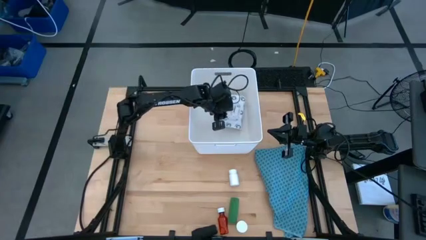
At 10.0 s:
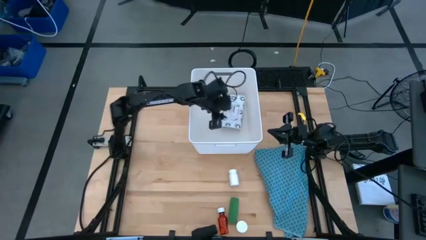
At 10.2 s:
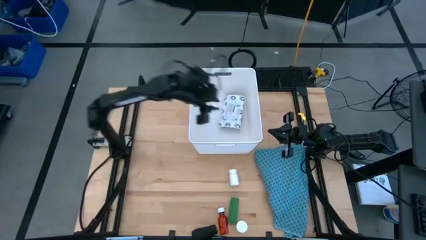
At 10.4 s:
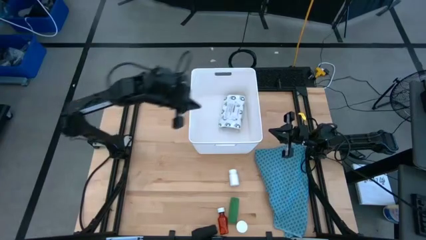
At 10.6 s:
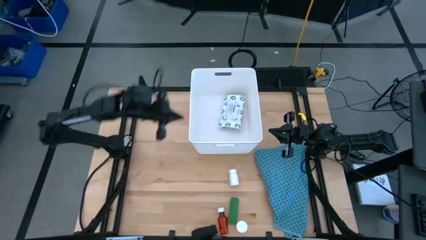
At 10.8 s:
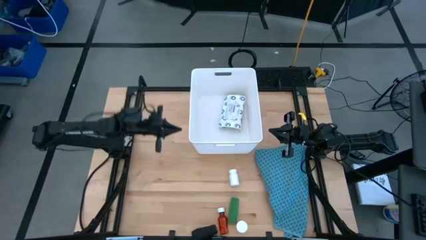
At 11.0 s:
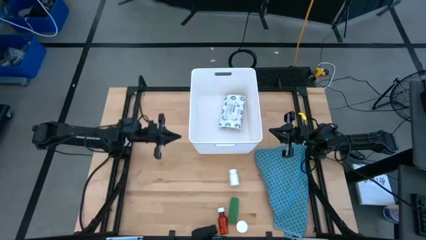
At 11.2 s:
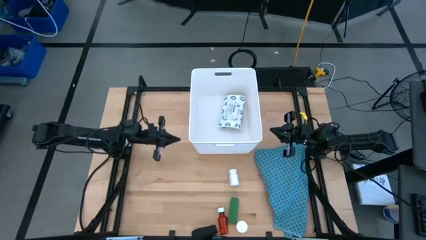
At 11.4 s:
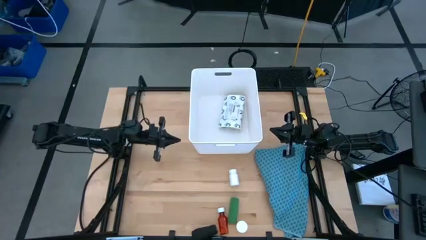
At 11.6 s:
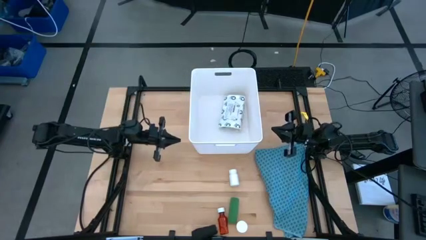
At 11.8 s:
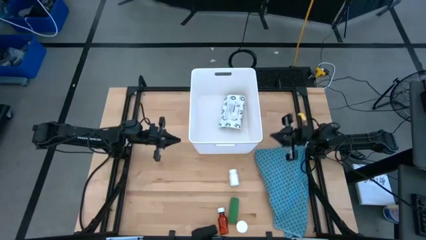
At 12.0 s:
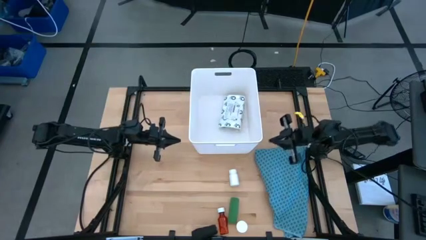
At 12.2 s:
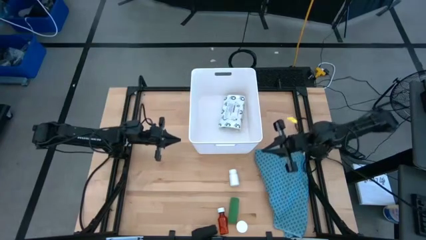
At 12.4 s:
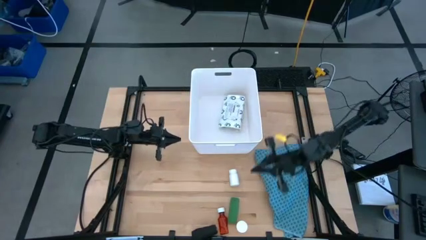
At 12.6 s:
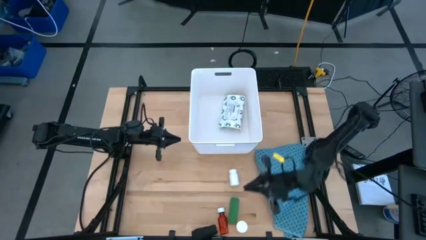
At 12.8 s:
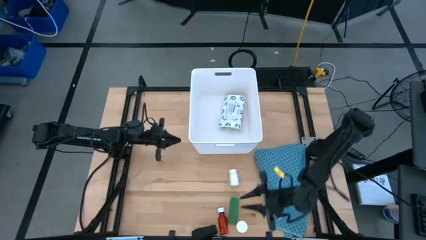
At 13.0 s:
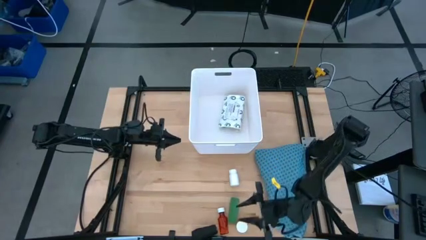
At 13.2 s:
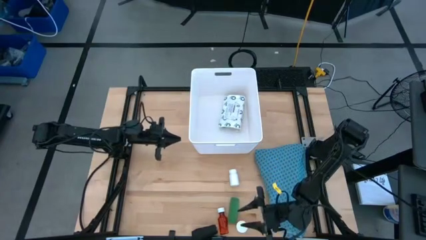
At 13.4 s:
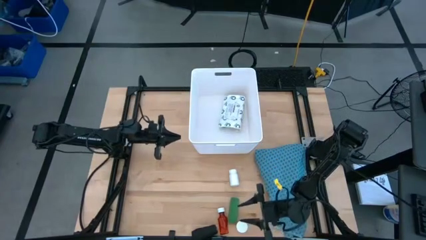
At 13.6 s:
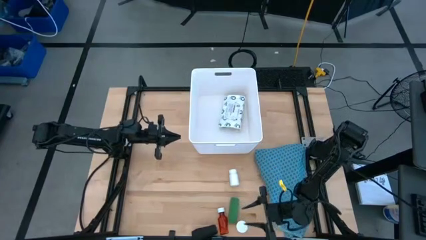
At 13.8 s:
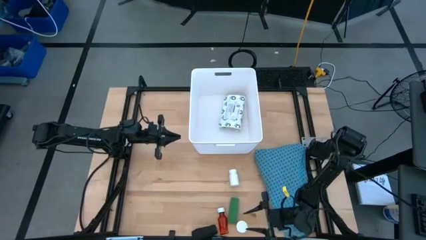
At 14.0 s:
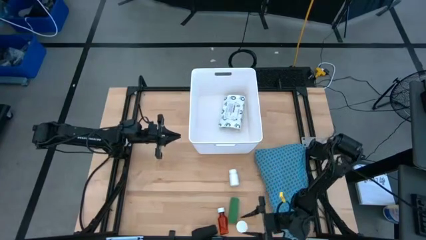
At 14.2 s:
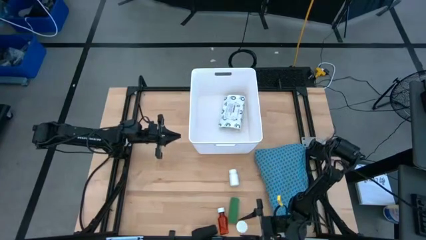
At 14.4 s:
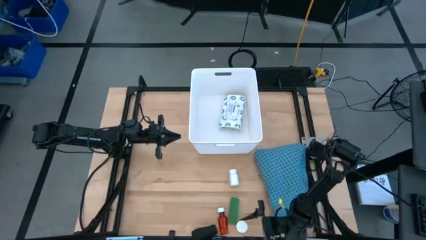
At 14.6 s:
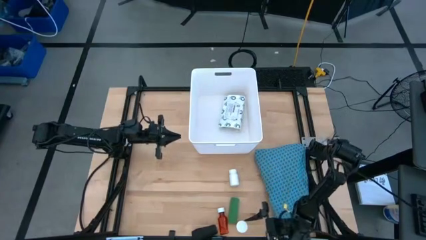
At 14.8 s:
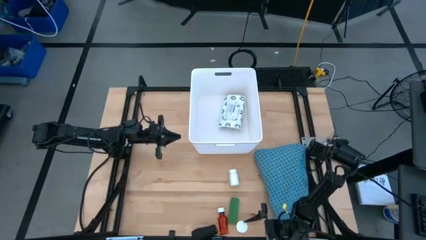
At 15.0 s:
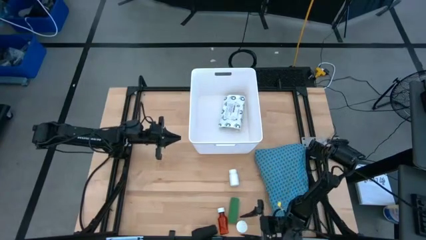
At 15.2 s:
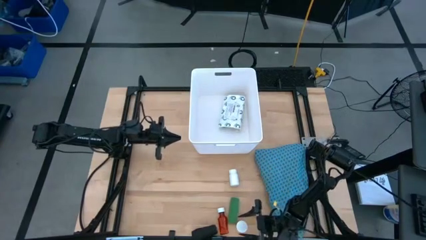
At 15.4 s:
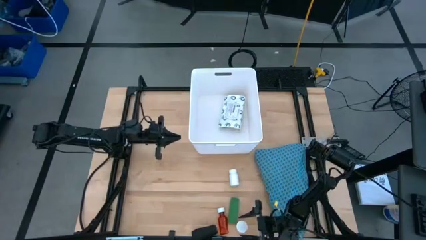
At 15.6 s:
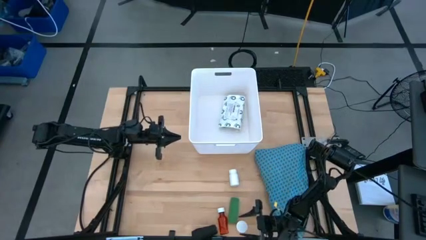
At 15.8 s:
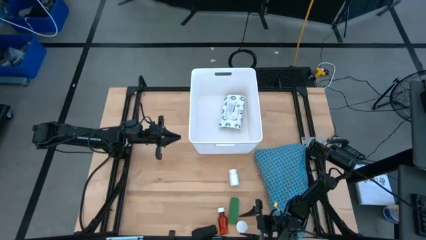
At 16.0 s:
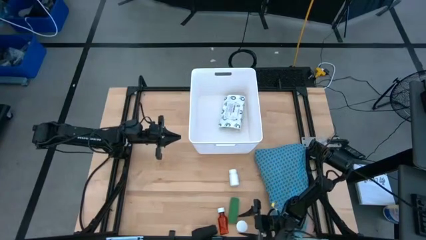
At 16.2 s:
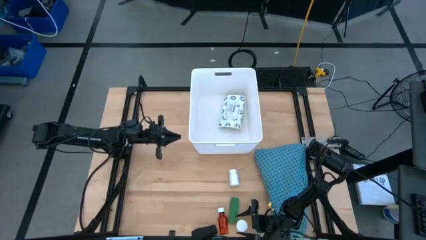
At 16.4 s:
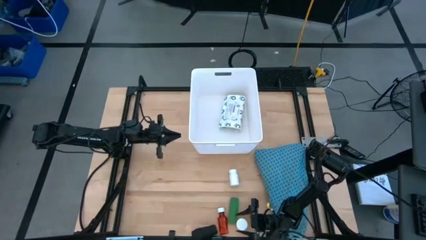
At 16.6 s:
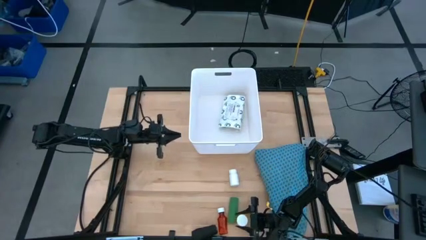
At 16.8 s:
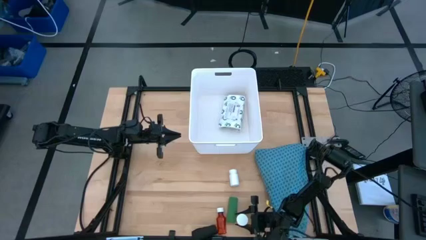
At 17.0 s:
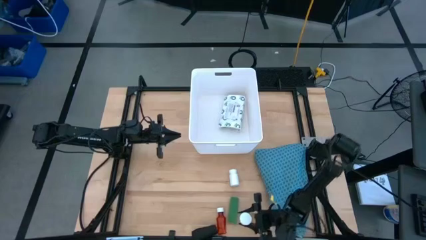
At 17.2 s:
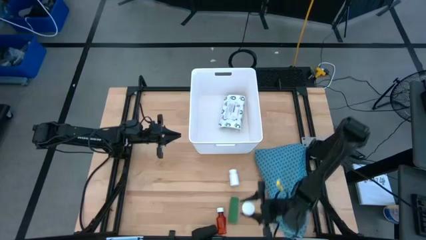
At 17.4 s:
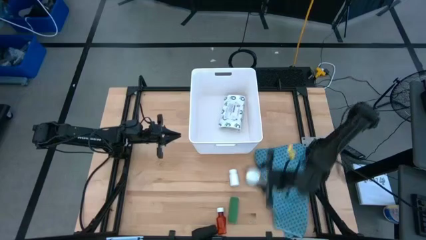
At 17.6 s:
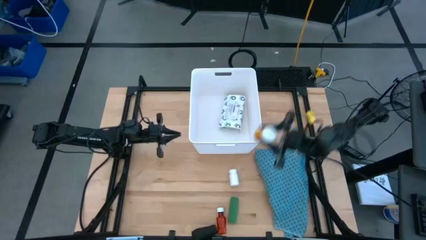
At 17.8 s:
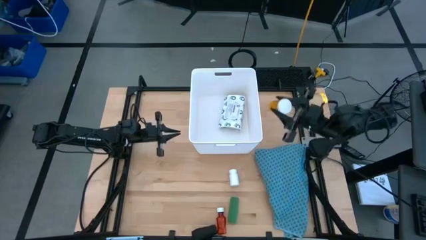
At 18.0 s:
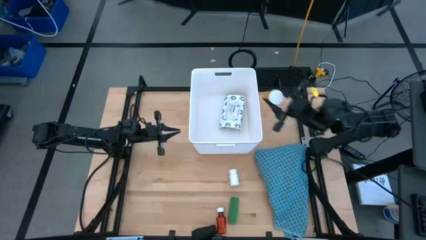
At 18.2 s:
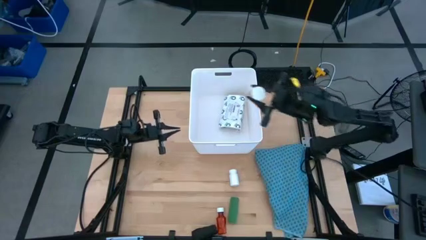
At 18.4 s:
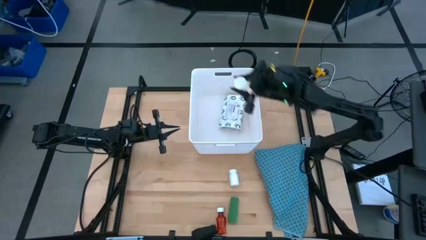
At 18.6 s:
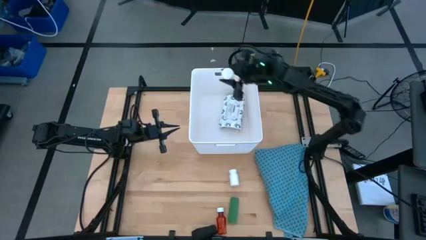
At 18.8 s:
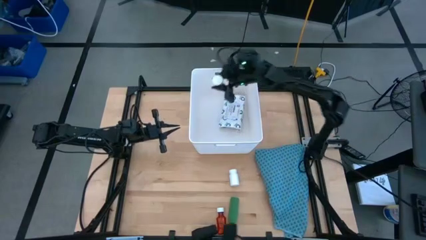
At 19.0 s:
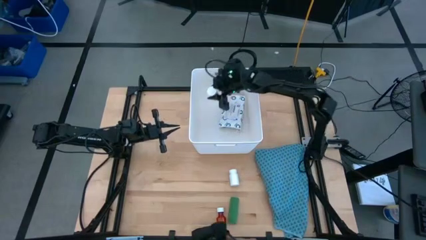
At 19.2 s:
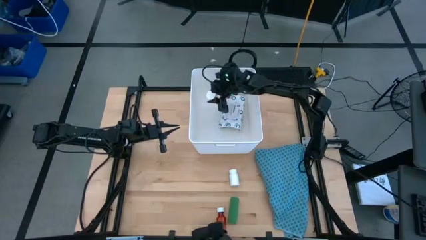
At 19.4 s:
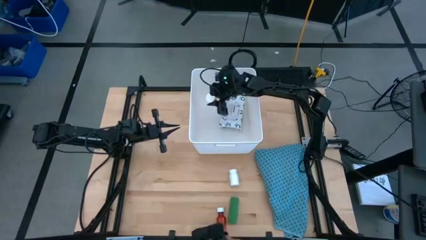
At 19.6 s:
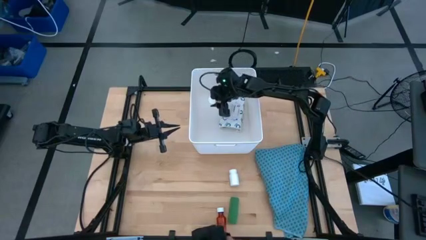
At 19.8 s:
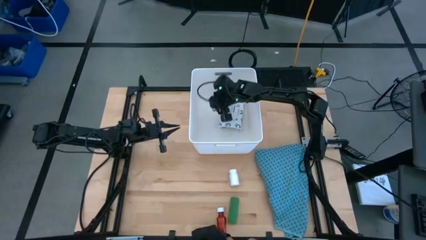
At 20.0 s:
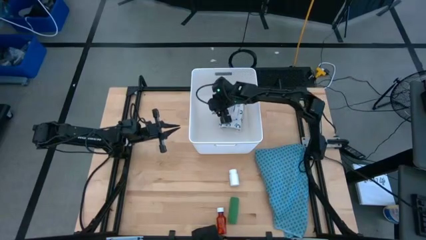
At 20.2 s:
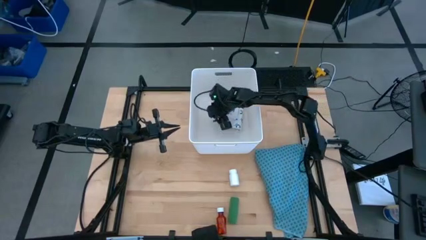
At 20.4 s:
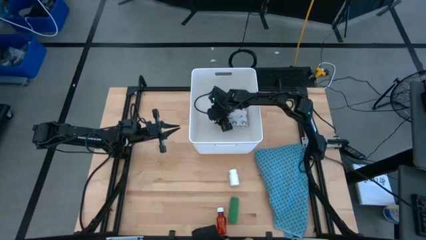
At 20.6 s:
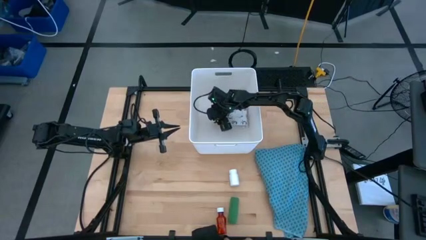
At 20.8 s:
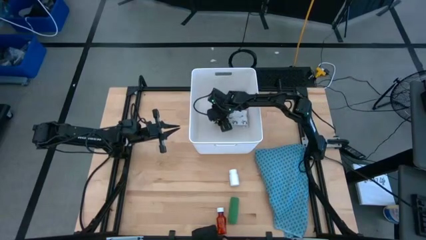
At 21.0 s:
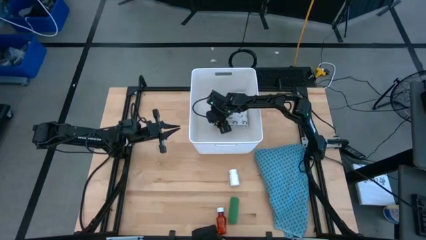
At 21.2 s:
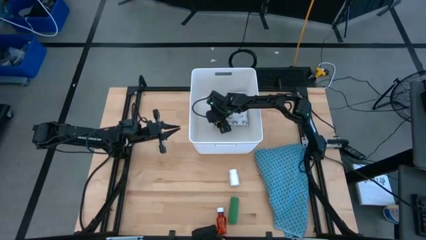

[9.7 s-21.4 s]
Task: Pick & place medical supplies in basket/bin
Put the orange pill bottle into the white bin

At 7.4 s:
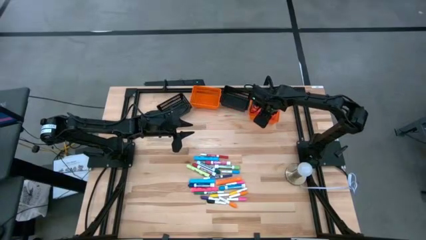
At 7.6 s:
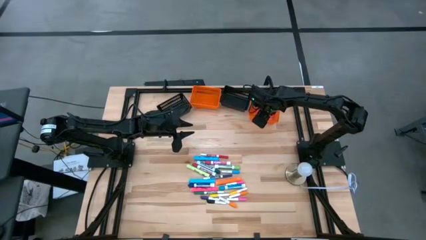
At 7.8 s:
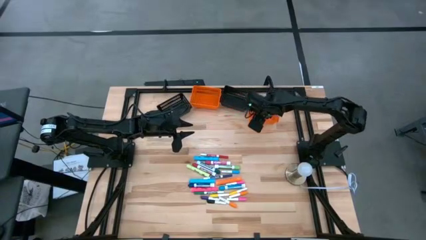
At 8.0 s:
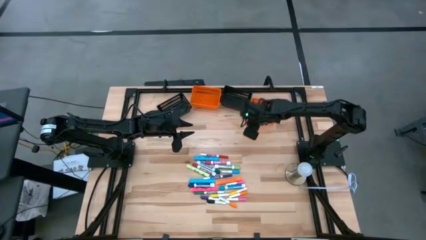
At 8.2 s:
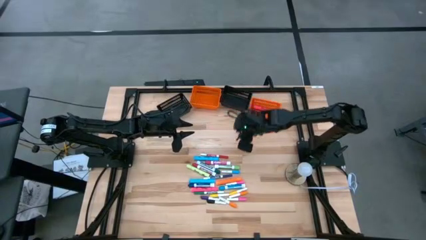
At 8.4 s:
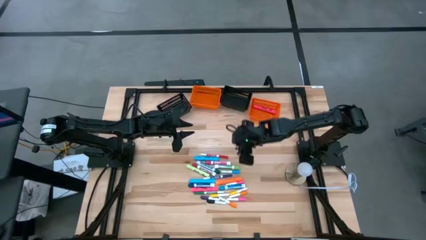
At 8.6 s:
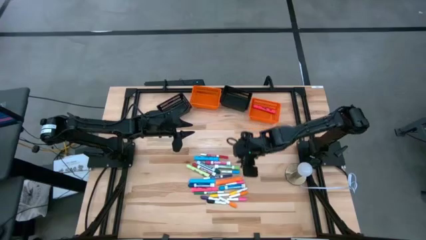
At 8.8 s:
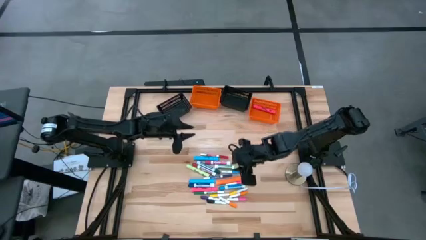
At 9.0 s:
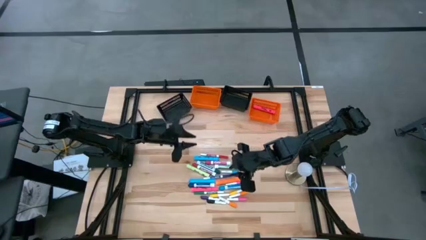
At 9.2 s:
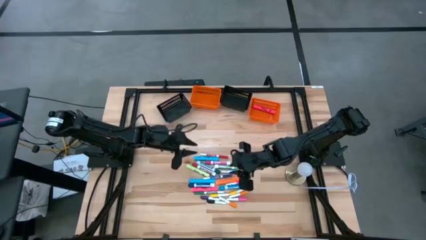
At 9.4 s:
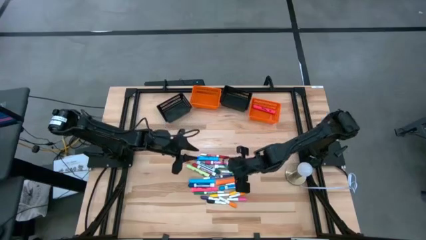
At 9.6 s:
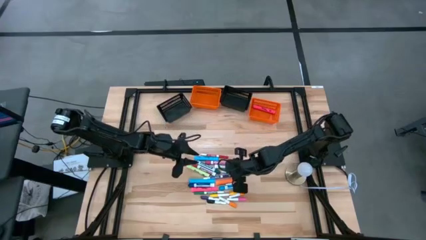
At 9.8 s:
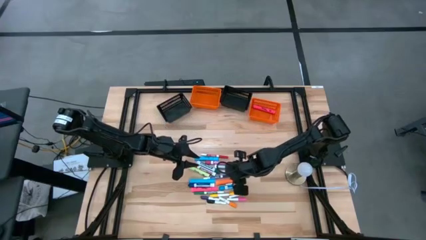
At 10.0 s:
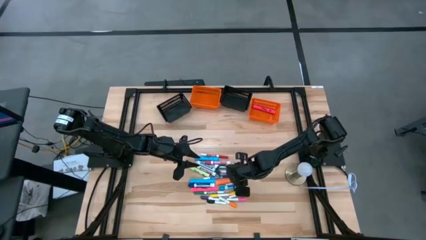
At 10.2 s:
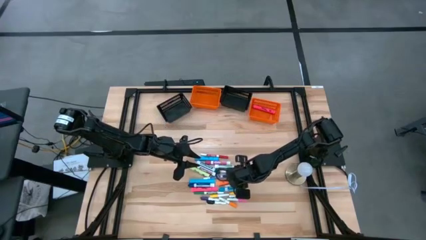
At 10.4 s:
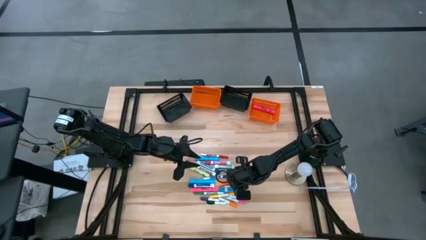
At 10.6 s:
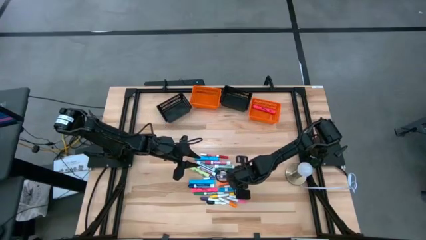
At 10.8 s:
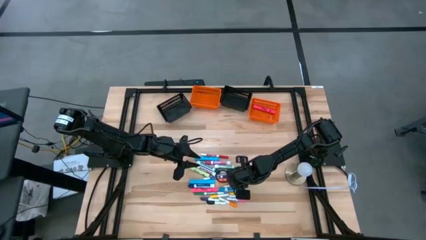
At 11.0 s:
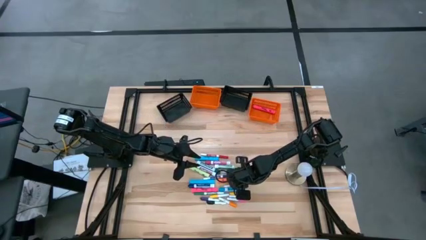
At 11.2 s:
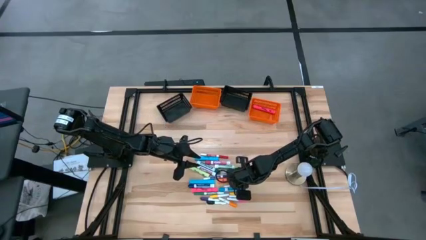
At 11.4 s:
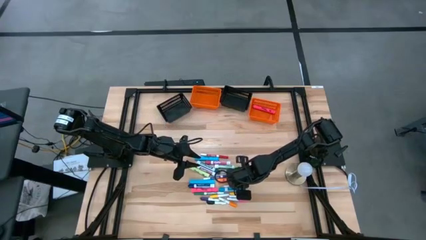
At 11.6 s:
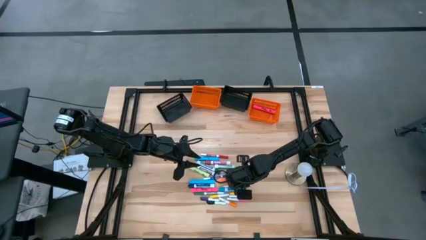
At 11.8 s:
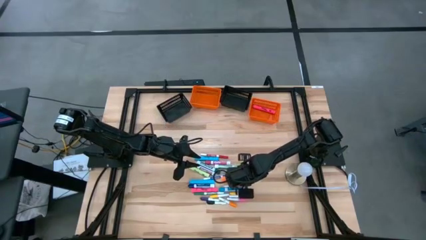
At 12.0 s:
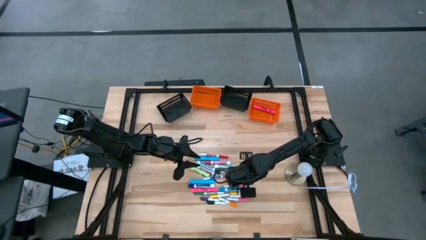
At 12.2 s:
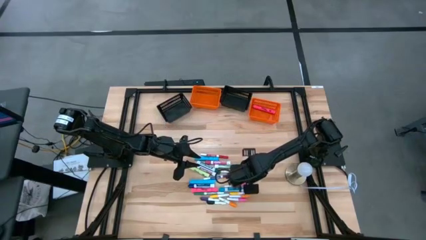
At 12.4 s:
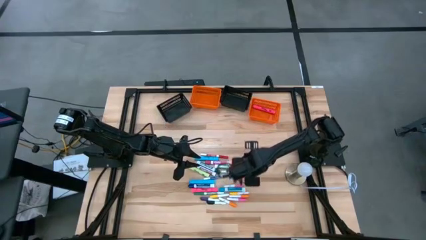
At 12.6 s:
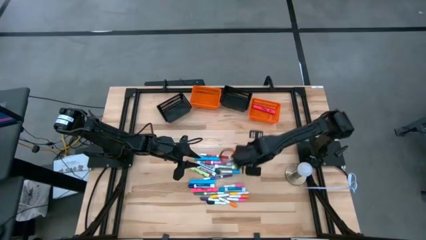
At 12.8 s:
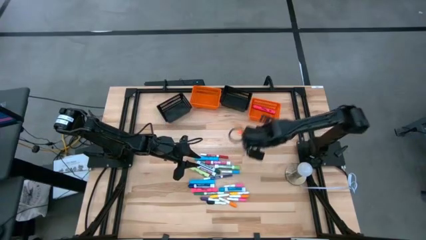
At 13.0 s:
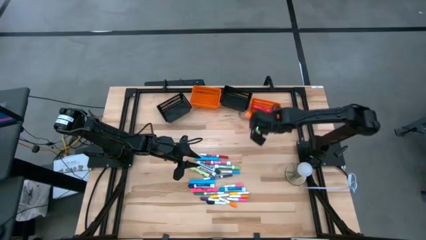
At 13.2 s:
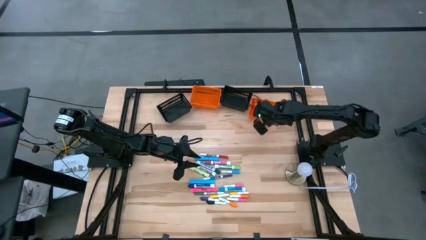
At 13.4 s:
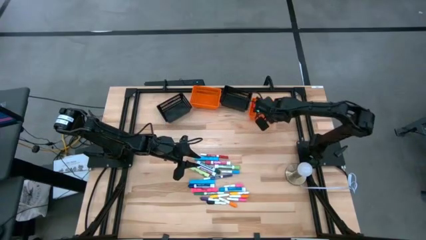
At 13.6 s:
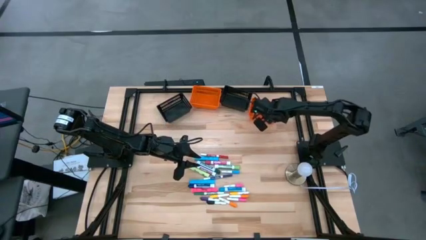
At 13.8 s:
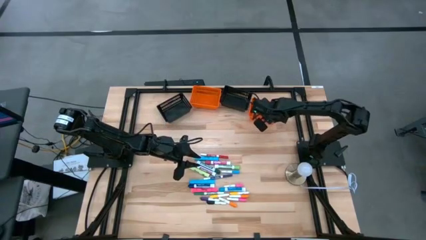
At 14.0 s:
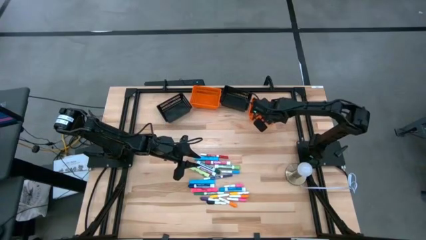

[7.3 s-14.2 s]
Task: Pick & Place Markers
Put the large orange highlighter into the right orange bin
